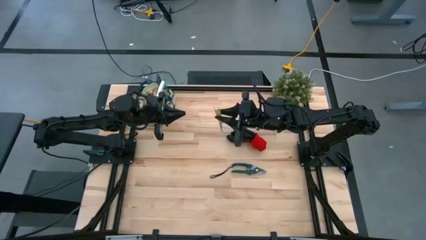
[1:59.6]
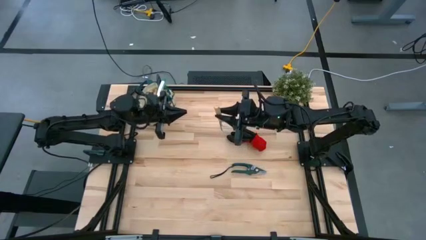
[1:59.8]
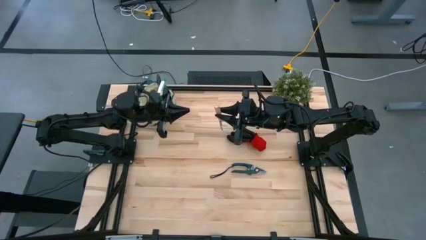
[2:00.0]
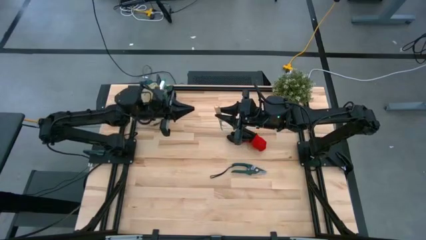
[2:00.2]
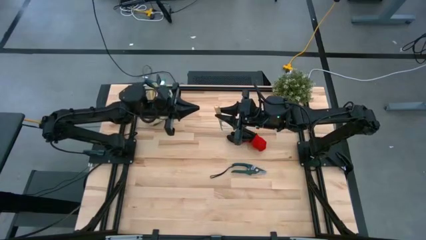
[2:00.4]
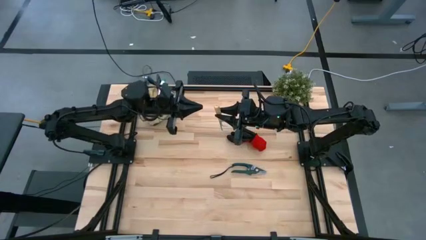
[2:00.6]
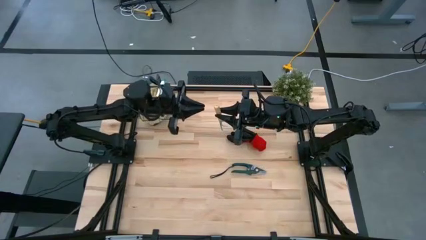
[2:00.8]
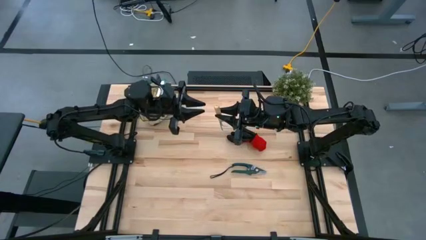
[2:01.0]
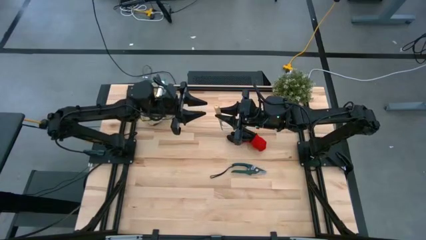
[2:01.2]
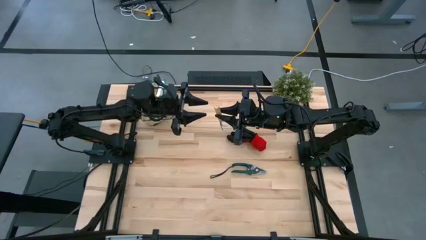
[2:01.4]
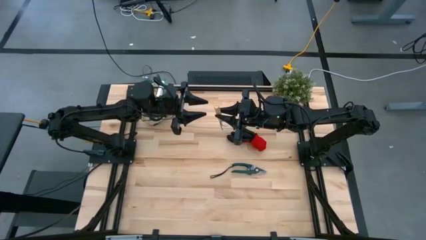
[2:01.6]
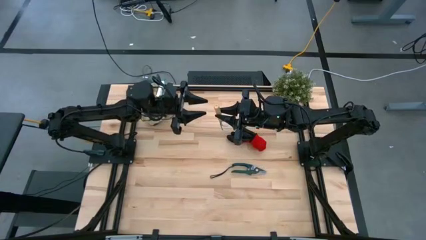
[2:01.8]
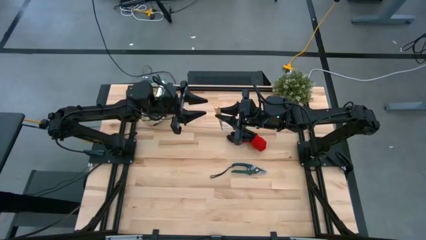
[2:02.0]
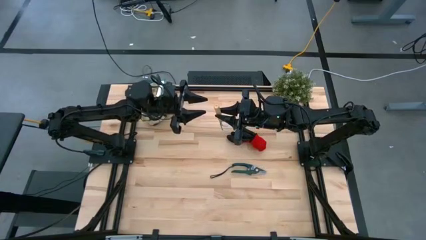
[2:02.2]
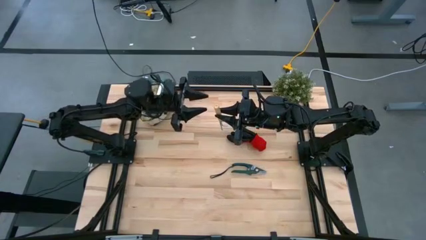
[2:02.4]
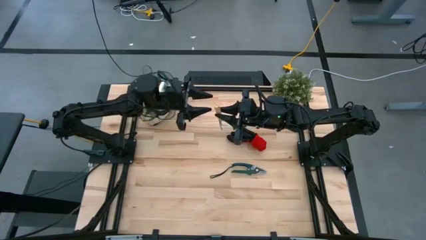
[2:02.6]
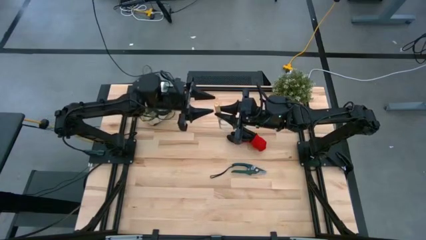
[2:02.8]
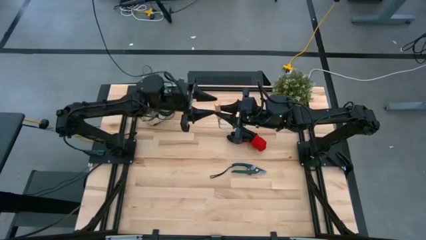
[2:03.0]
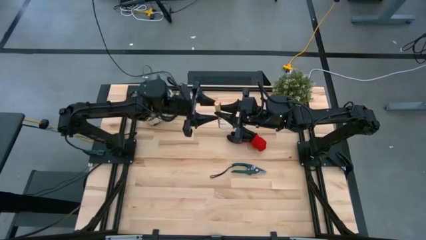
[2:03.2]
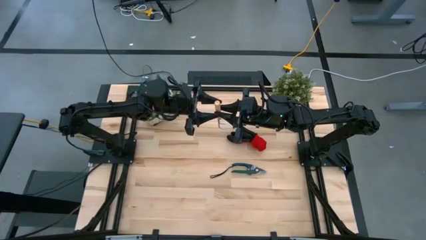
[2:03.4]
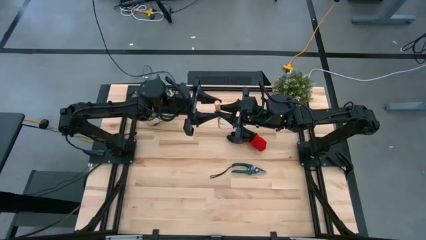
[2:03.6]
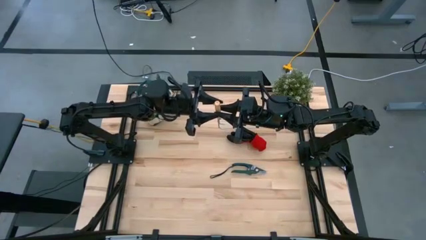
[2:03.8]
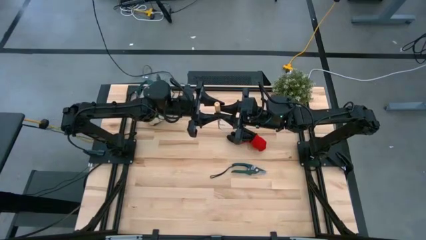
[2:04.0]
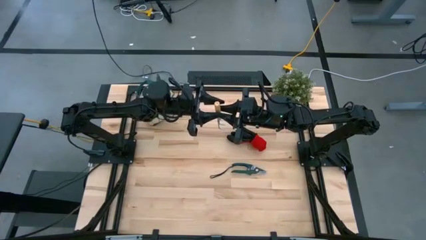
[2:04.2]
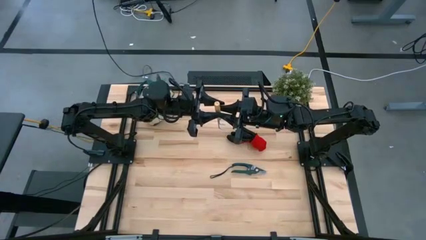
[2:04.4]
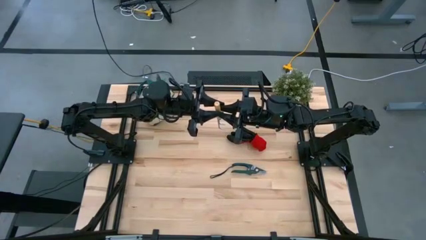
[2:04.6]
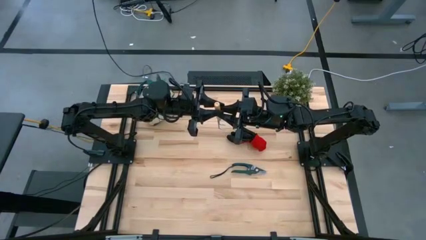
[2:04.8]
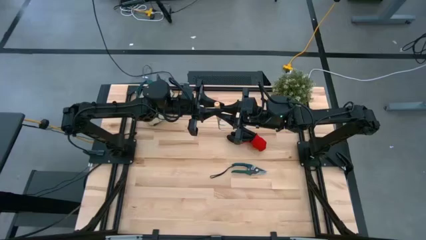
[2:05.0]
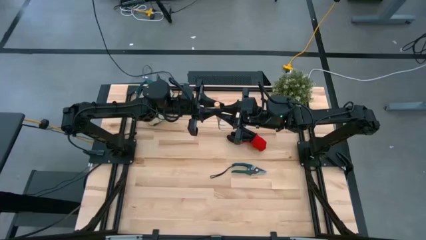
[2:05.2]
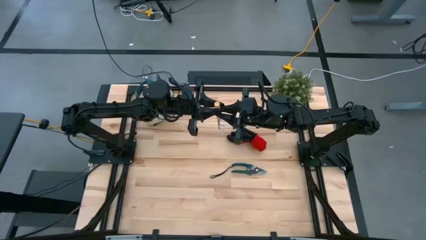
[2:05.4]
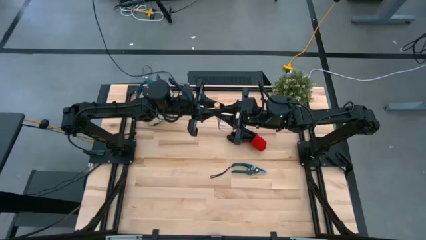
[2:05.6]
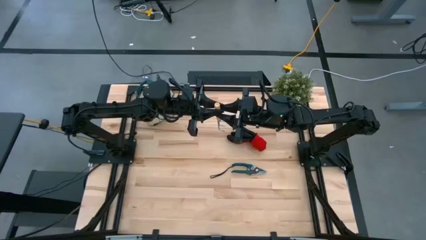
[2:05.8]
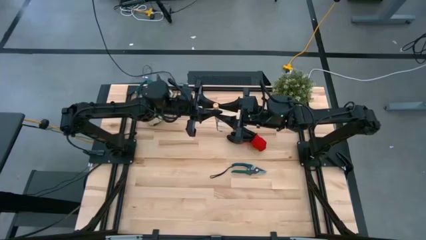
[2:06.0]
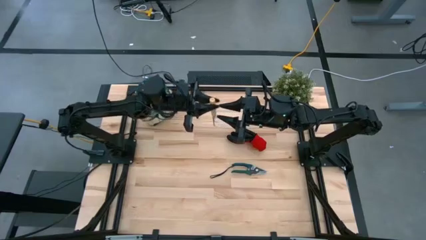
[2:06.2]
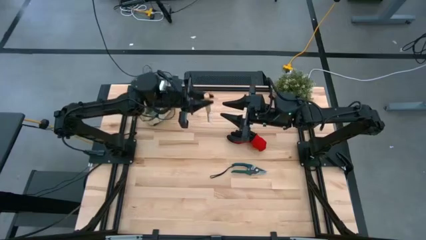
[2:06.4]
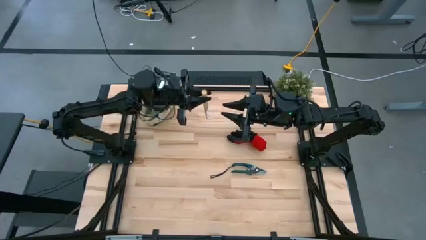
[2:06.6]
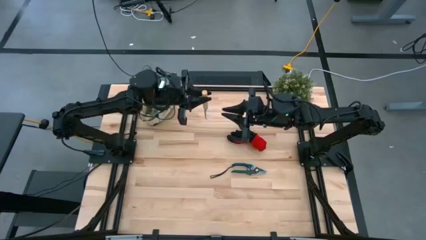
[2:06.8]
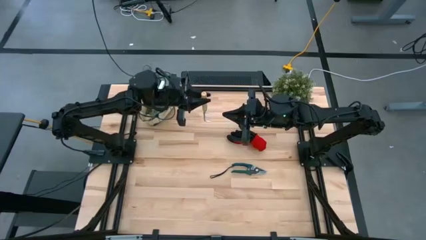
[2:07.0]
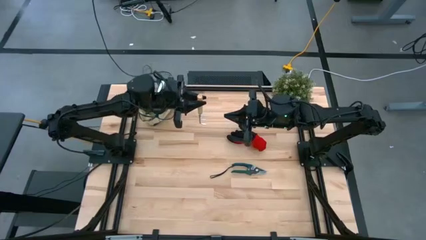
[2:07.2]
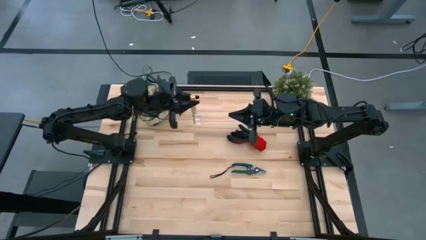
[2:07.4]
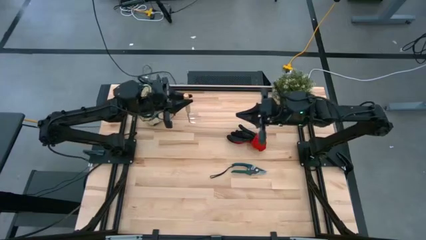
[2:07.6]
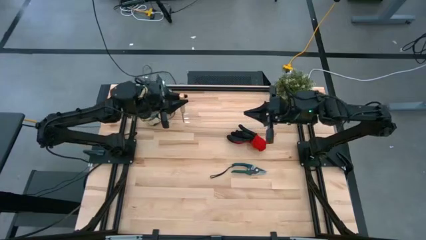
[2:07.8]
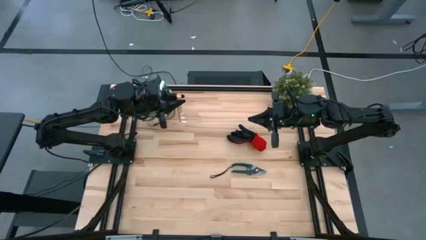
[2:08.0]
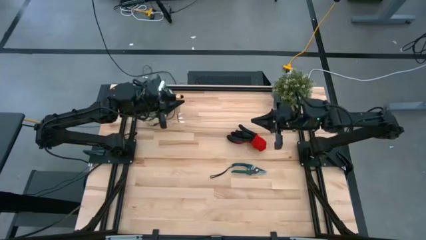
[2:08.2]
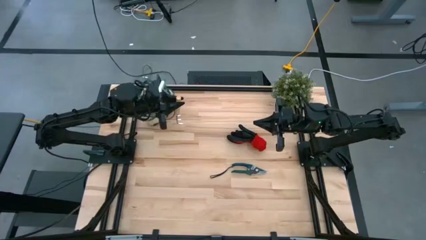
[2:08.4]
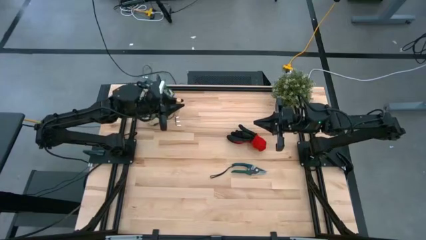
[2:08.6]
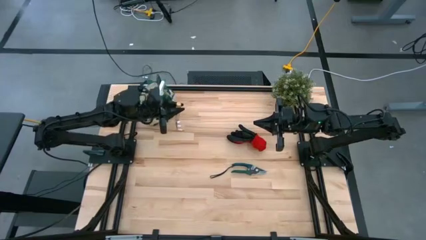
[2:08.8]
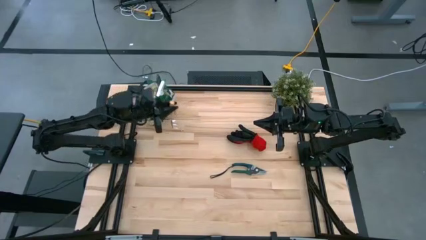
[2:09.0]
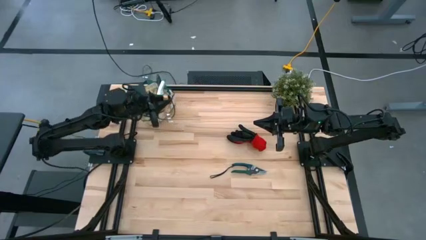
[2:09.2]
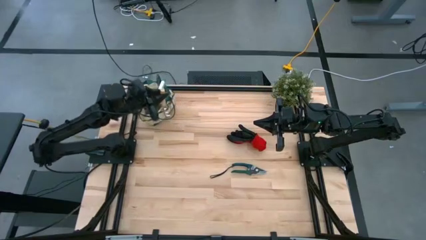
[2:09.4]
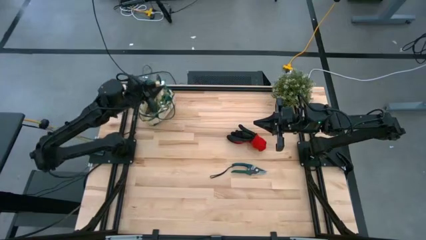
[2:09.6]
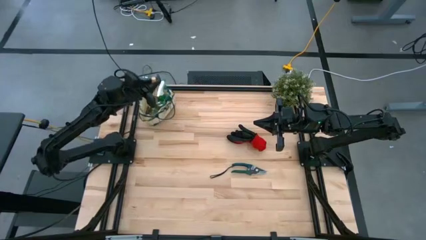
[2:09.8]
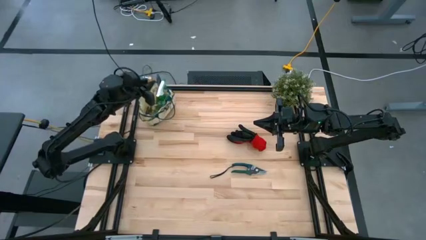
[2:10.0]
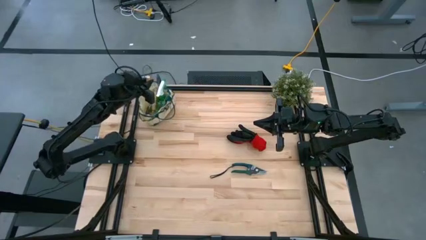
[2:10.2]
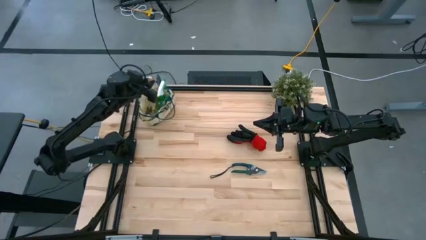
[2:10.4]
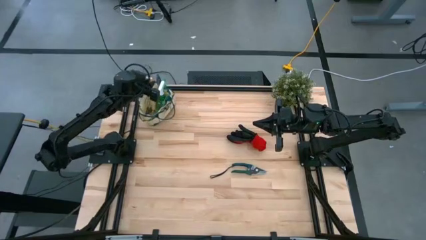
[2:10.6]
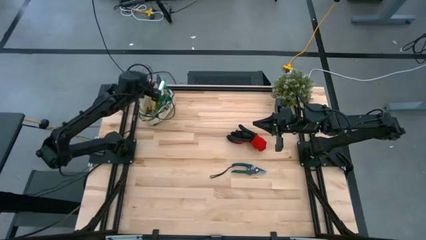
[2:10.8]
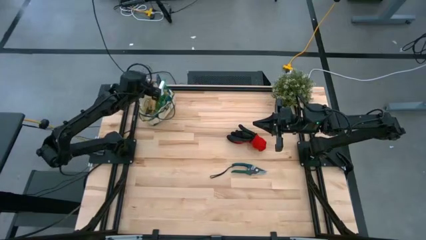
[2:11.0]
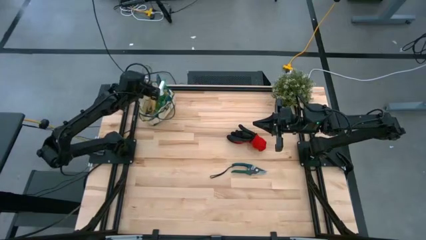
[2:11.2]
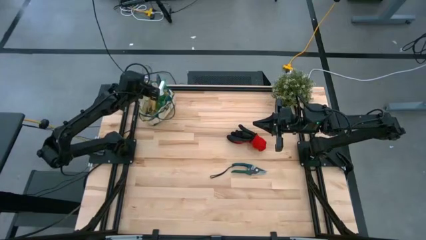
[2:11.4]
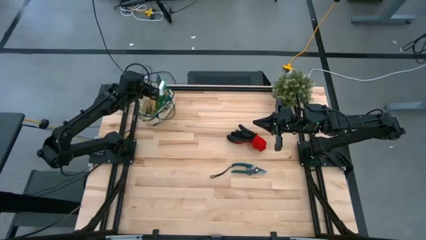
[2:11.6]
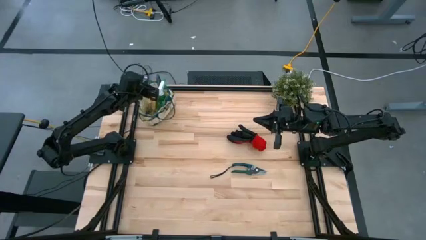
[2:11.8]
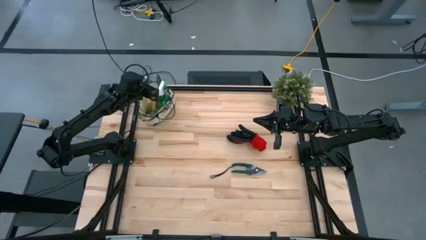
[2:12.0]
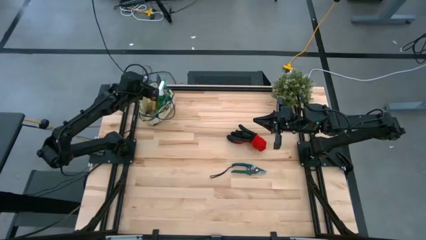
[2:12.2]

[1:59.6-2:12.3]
Task: Pick & Place Garden tools in Gardening bag
Put the brown hand rake into the gardening bag

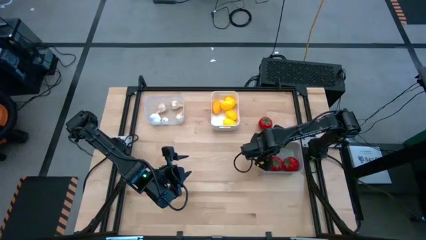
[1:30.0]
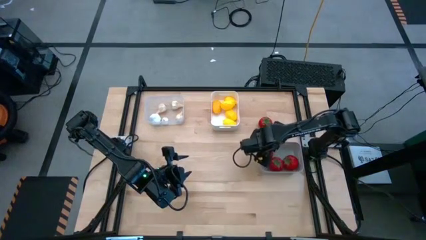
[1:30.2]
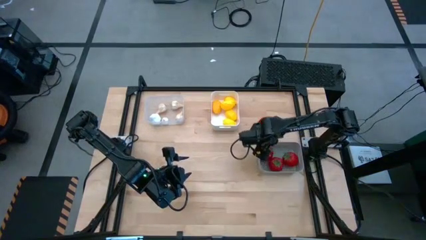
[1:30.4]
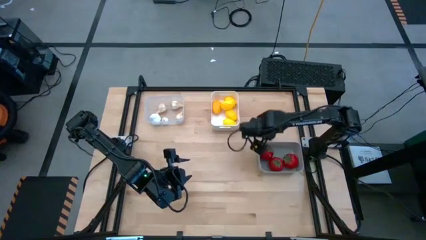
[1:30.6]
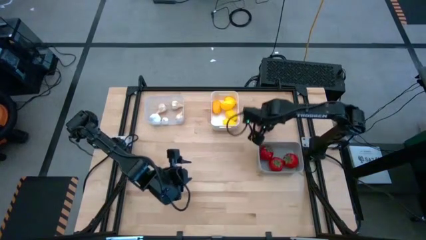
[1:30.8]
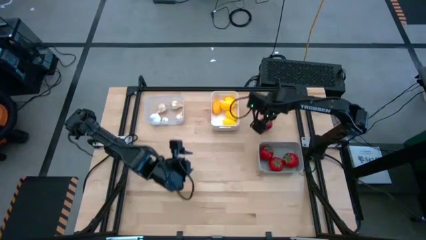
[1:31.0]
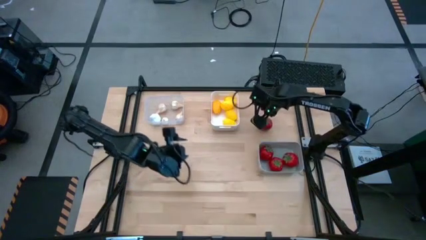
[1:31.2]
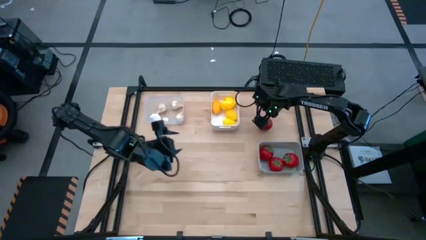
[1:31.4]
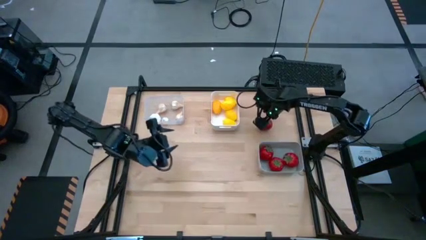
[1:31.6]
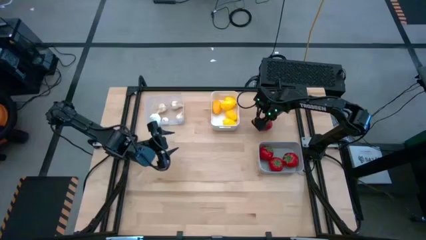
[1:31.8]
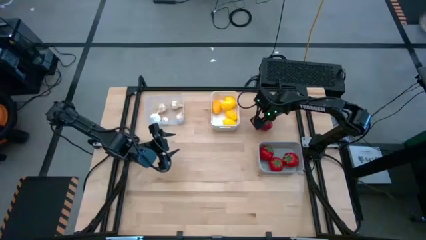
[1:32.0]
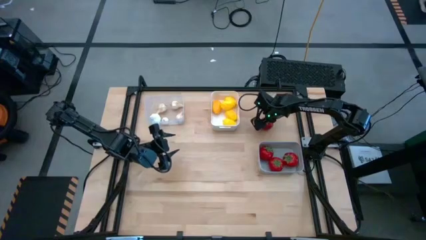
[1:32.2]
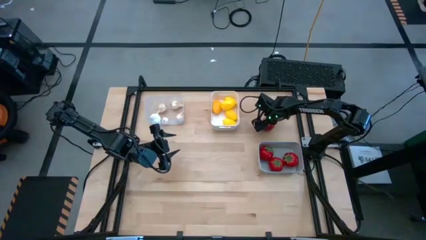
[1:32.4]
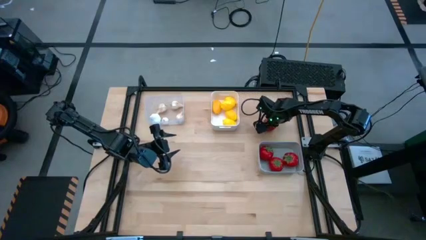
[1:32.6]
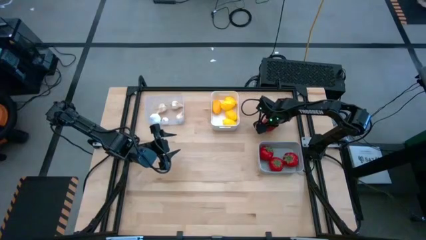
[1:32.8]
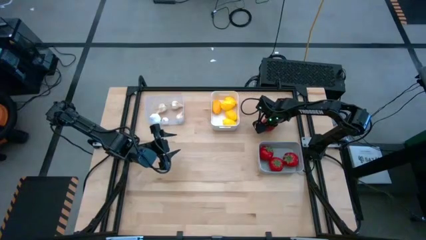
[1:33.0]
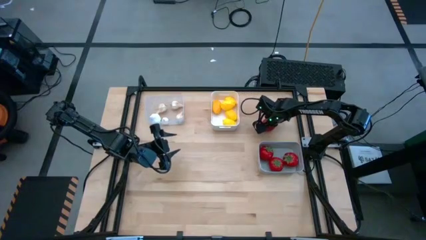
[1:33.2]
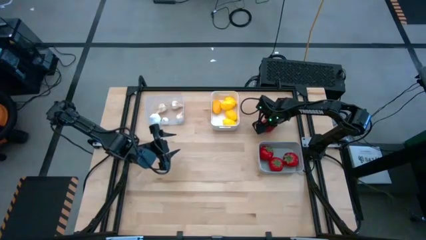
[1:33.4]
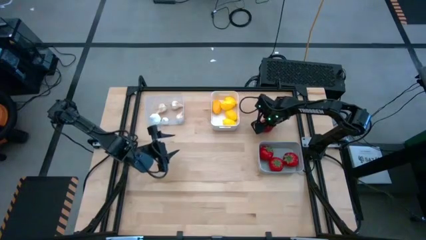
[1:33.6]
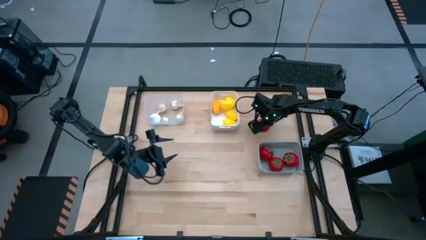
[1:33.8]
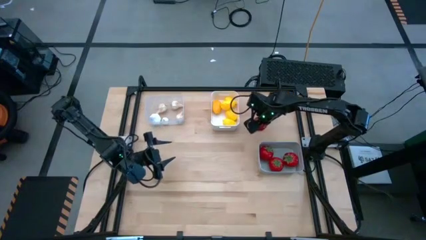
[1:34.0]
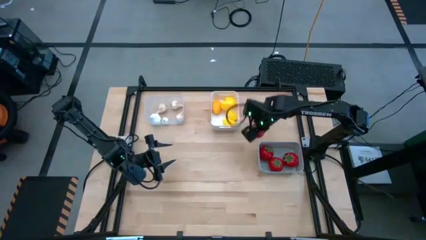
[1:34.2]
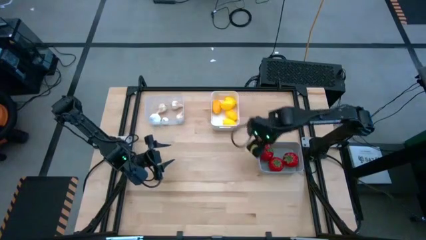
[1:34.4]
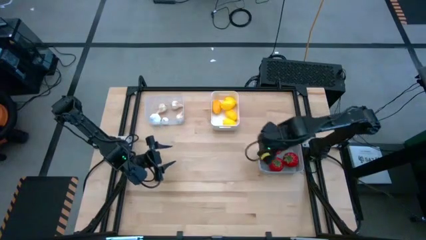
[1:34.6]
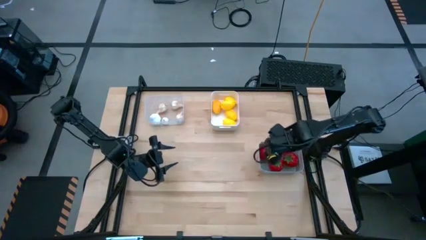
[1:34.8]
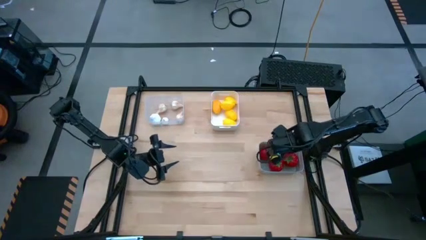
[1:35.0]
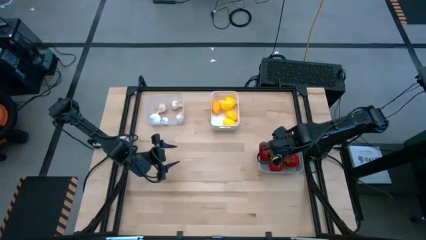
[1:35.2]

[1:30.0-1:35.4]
Task: Sort produce into baskets
Put the tomato into the gray bin
